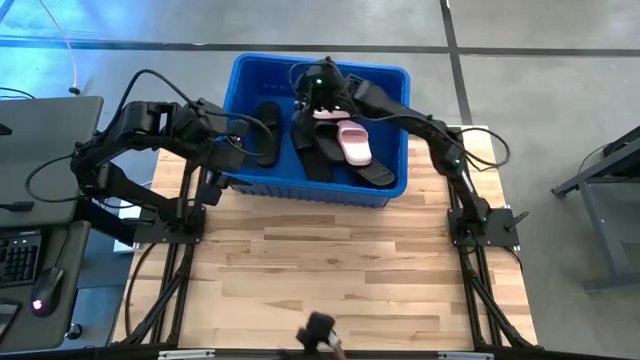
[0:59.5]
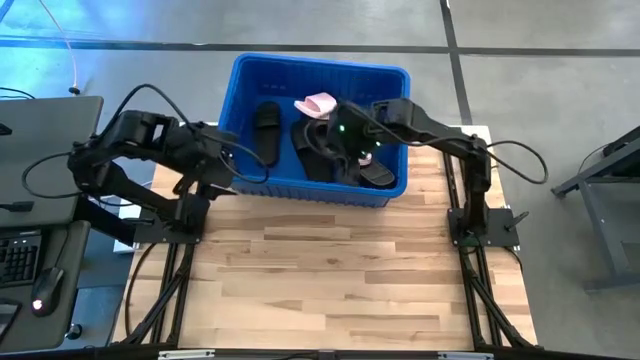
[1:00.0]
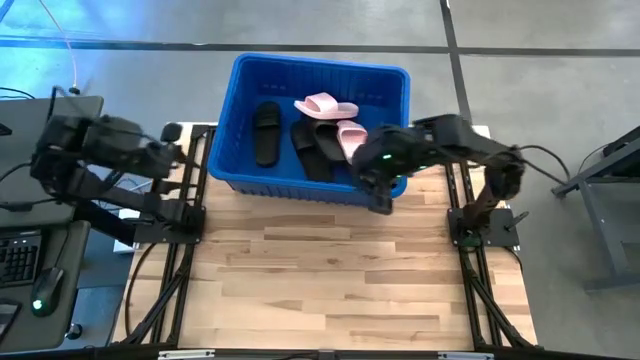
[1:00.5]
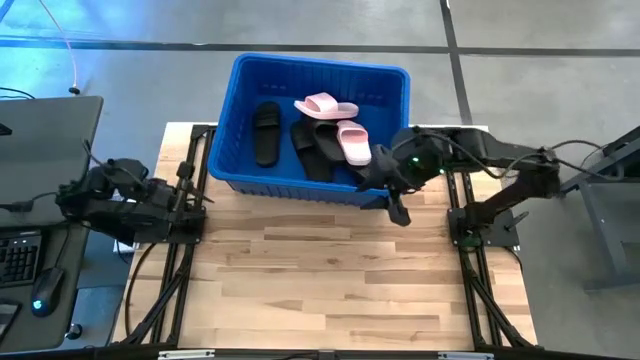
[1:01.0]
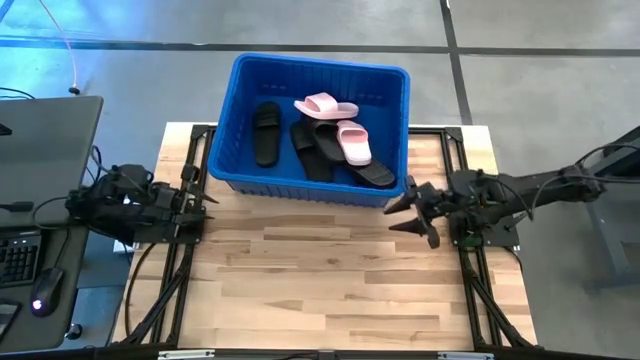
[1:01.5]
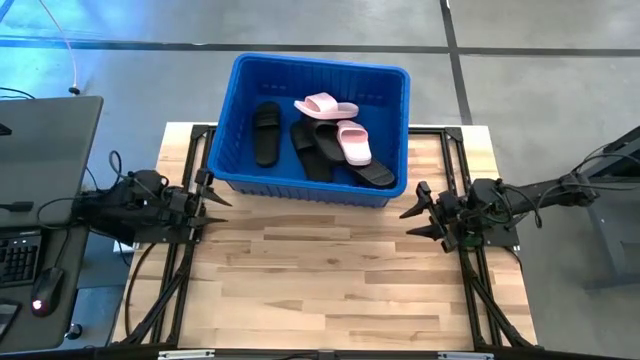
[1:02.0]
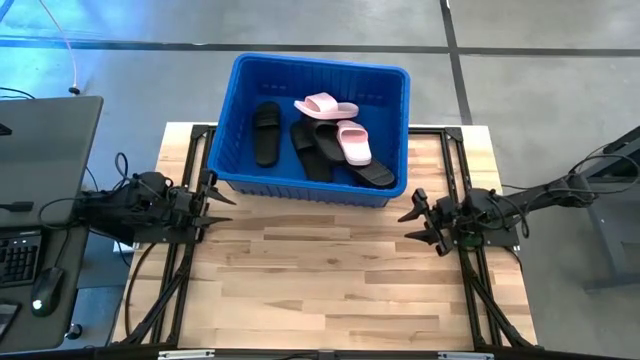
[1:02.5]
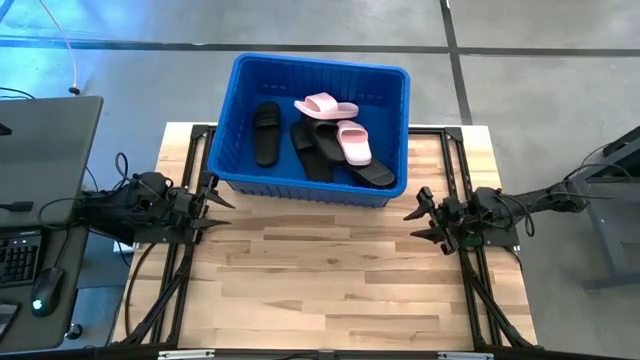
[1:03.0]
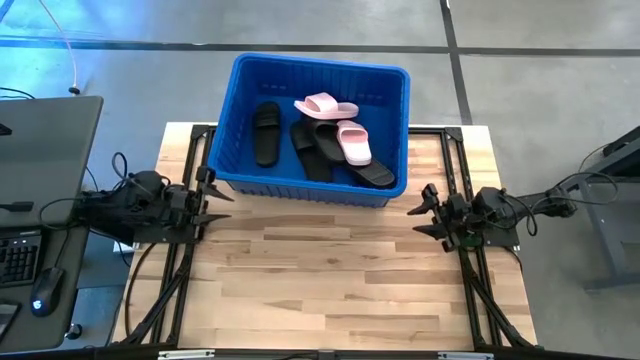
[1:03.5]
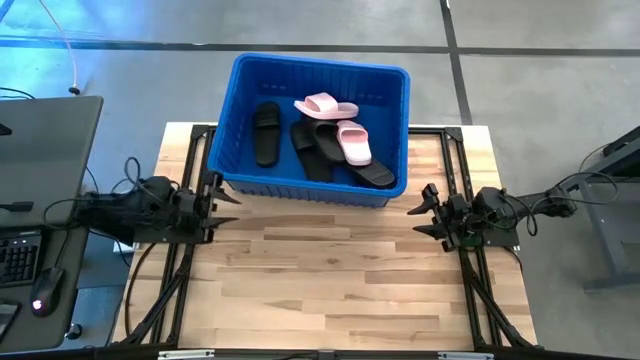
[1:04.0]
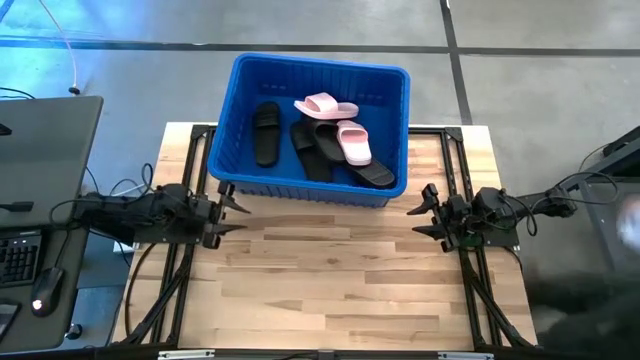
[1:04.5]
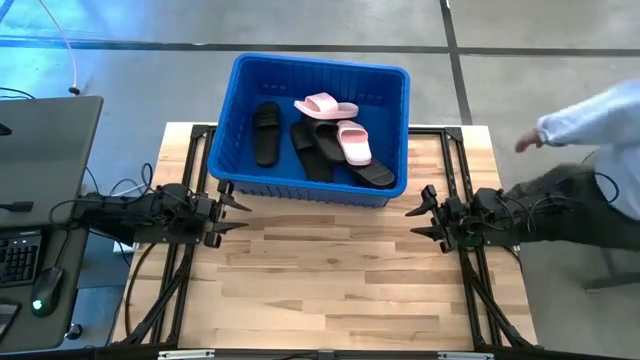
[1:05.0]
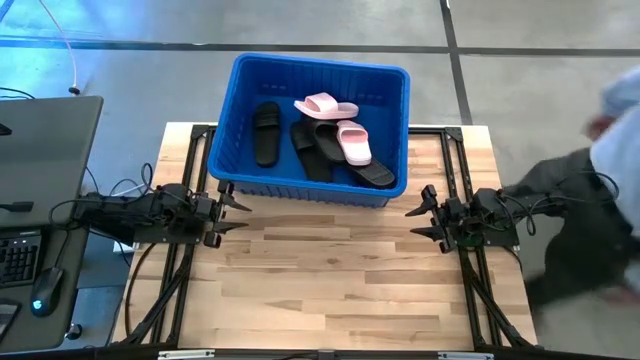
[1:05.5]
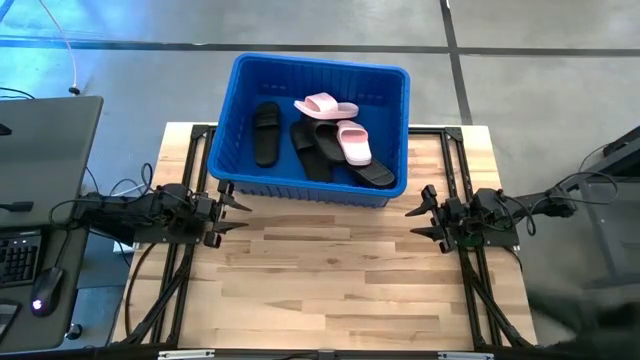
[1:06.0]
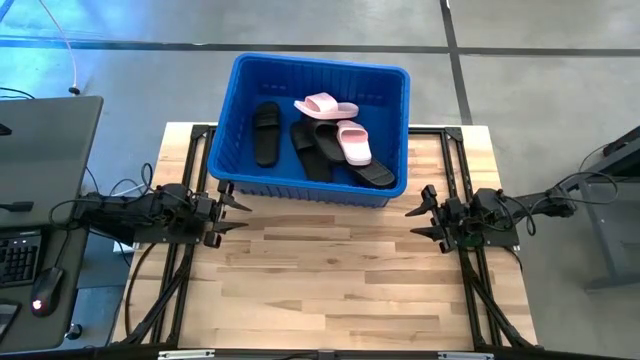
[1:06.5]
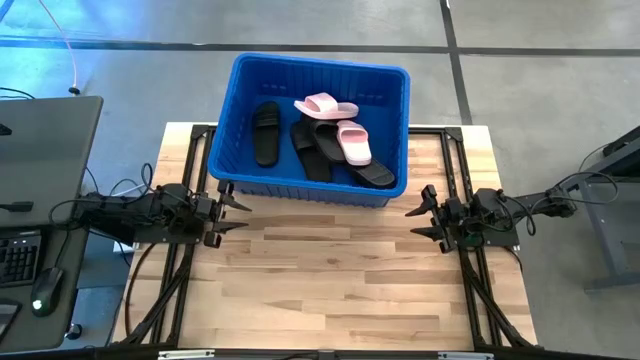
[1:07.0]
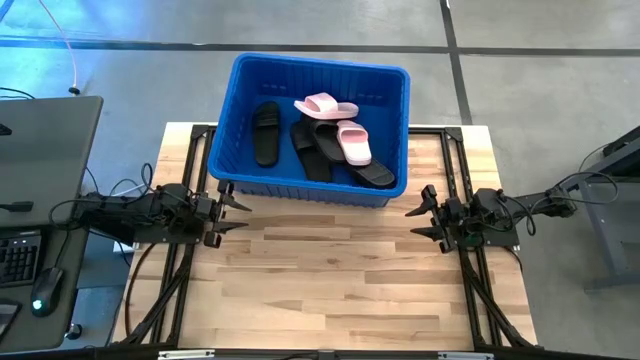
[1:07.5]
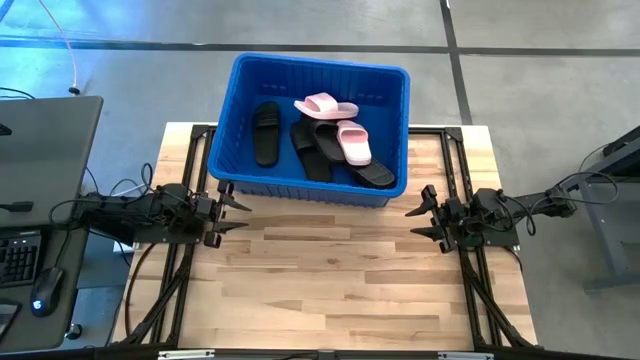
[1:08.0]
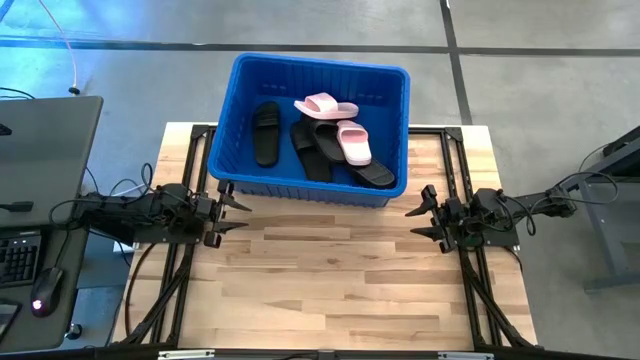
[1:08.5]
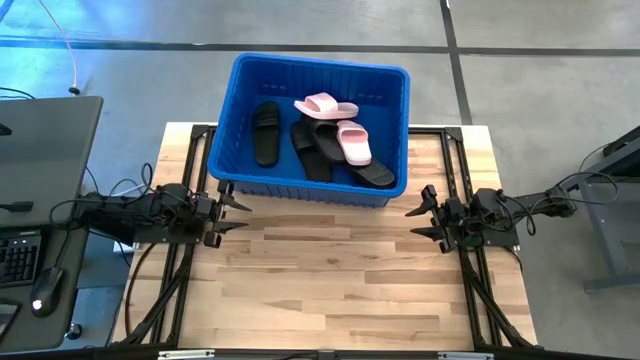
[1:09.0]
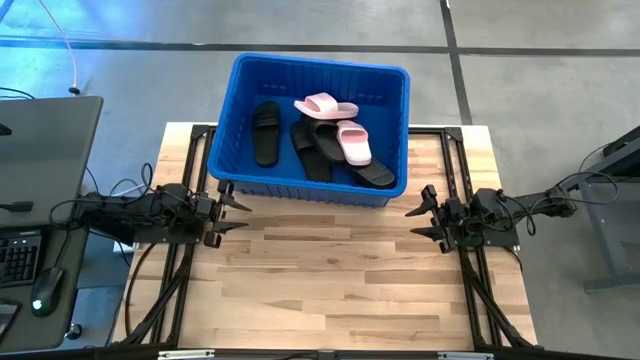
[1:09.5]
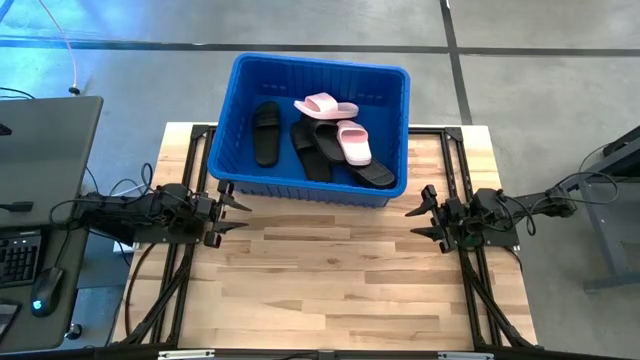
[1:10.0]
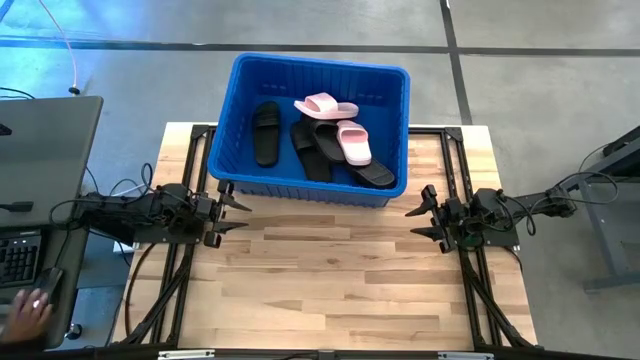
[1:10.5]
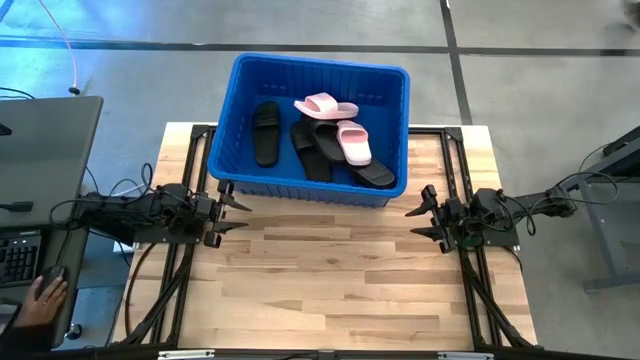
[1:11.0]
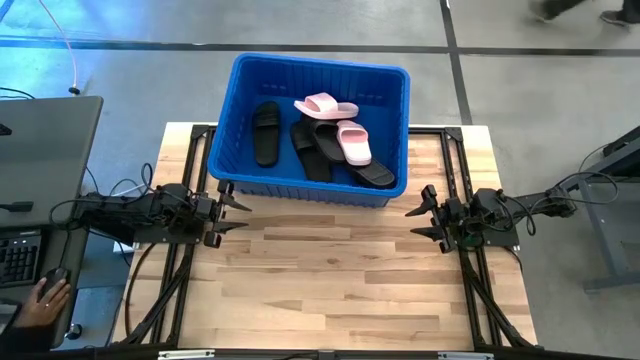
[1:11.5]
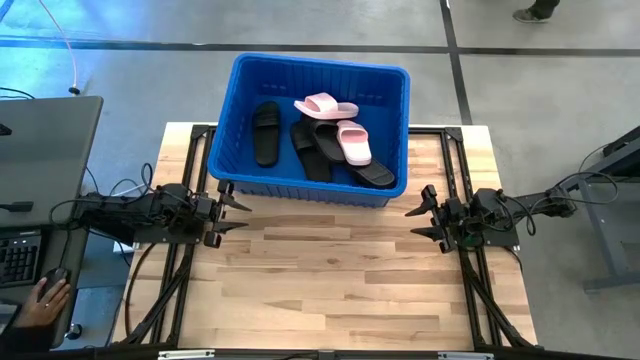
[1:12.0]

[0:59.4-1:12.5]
Task: Pick and place slides into bin
Return to Home Position

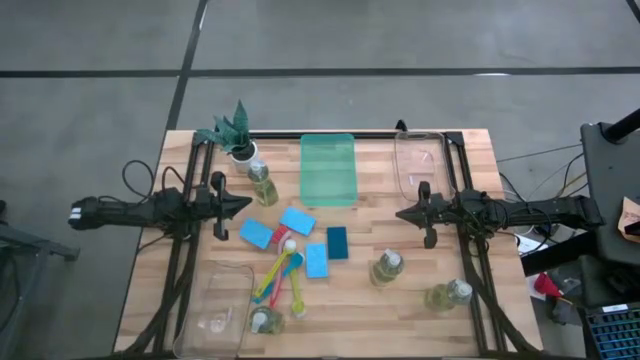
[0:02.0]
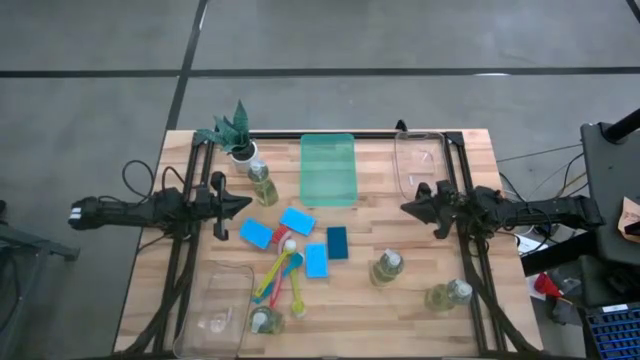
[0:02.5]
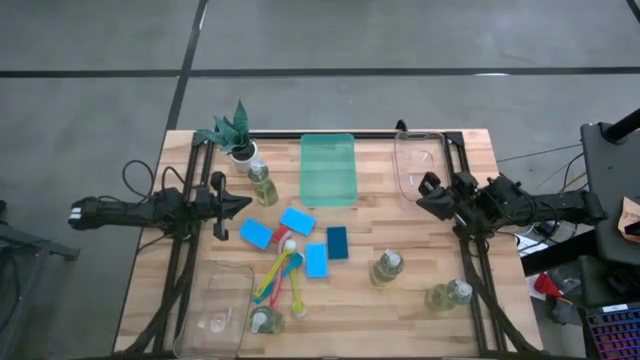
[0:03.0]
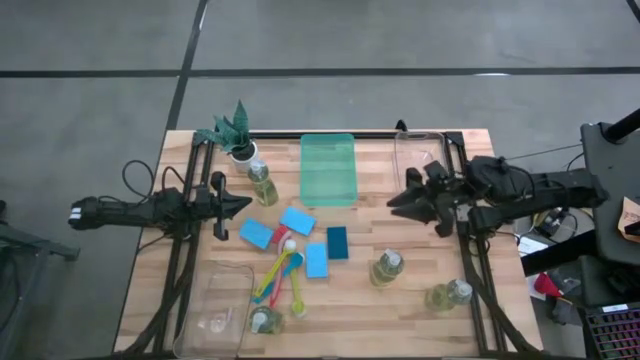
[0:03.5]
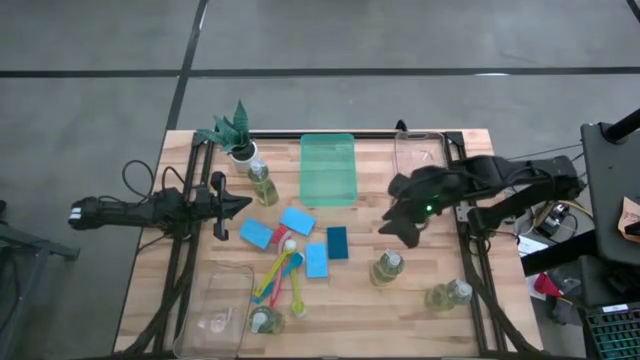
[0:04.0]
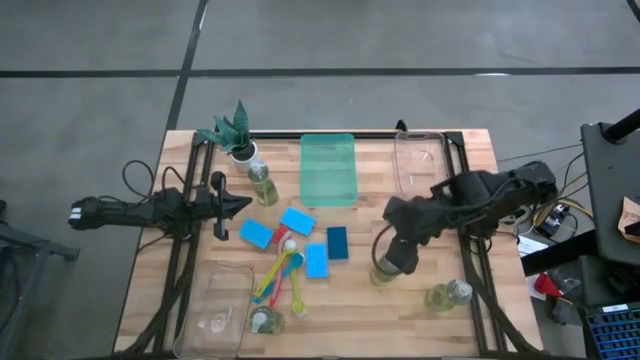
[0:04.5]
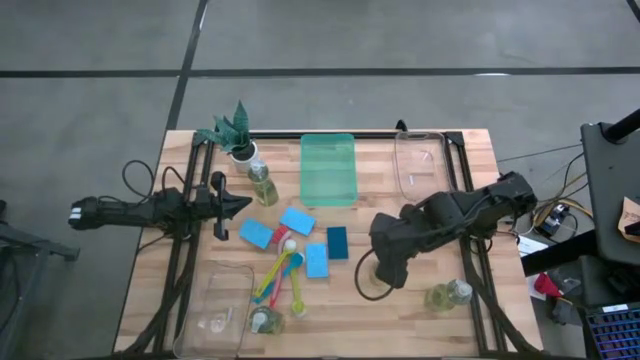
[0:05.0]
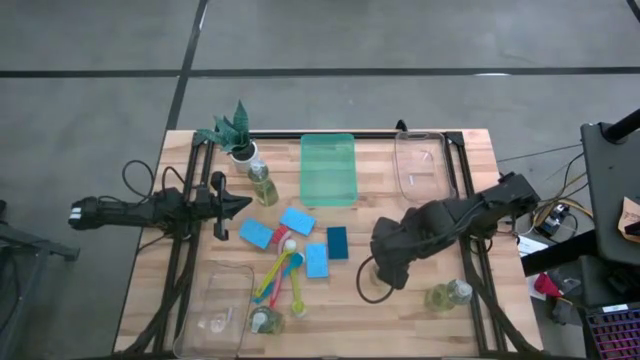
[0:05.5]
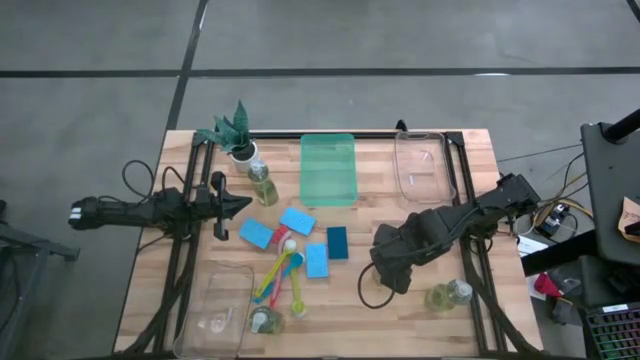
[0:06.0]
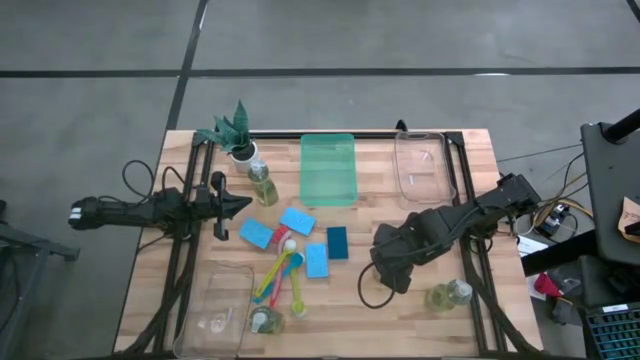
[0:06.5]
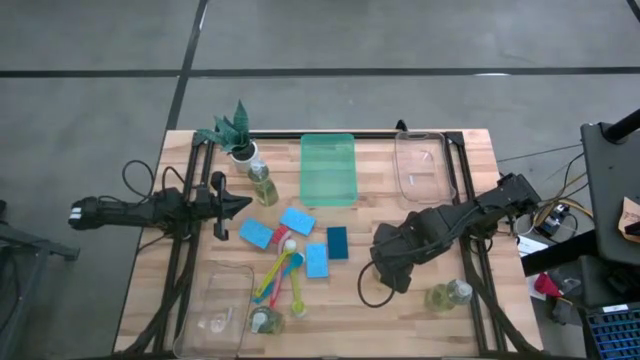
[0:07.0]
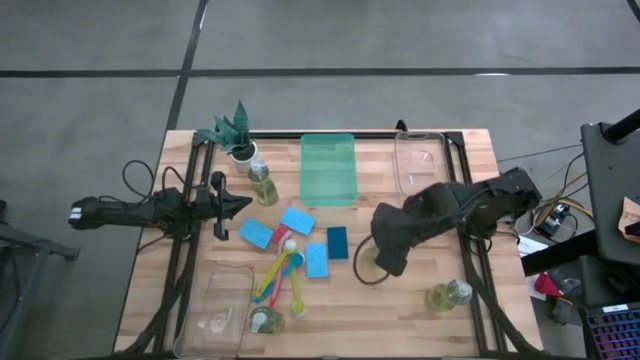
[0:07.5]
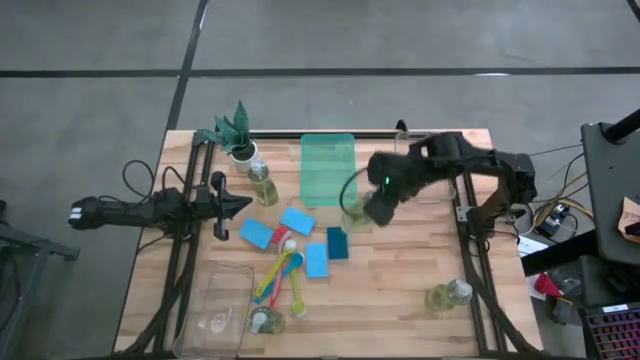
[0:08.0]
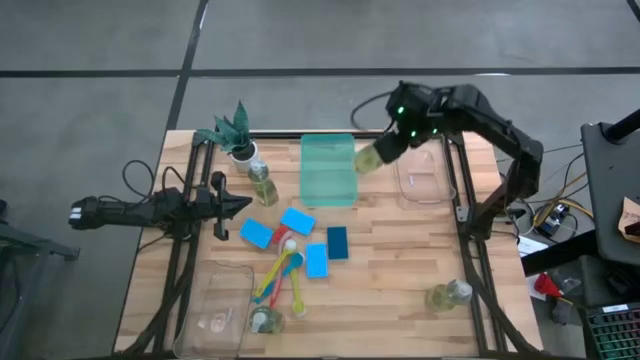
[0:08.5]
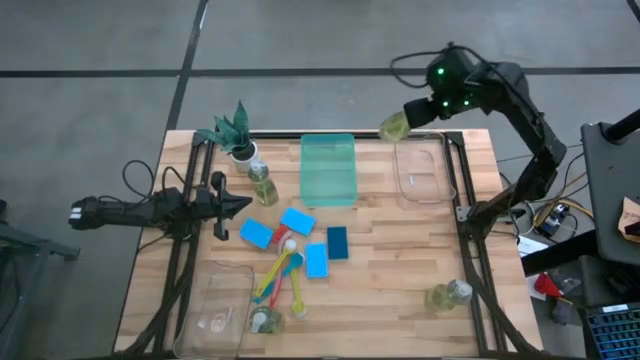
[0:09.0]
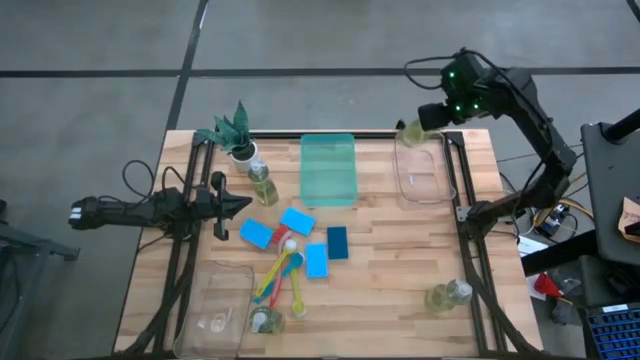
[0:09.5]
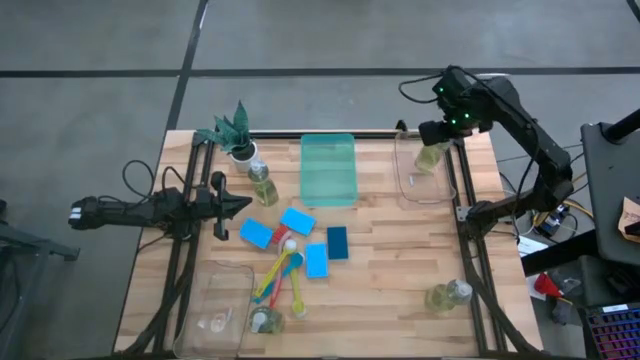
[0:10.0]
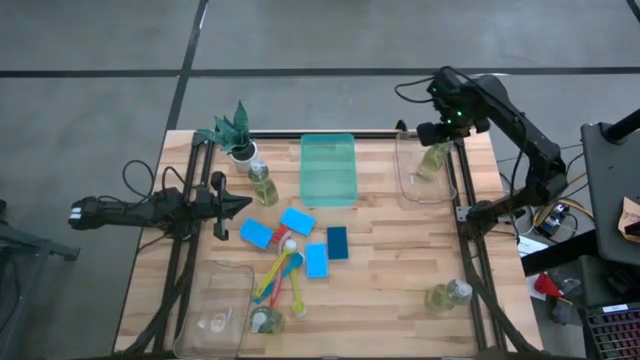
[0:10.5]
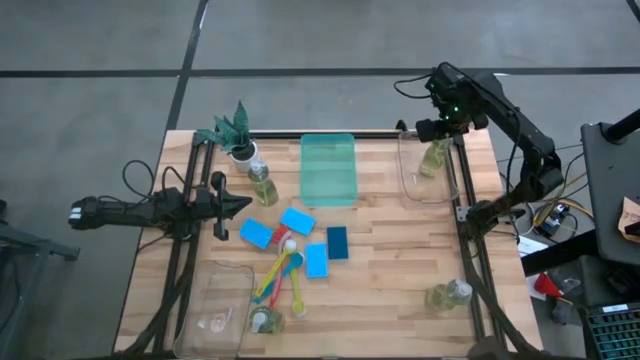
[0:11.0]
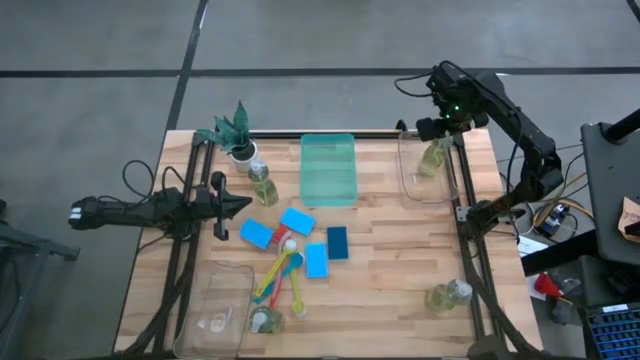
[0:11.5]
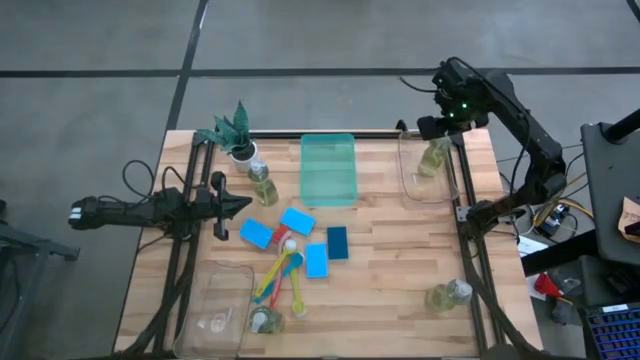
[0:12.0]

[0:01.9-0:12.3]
Task: Pick & Place Kitchen Sink Supplies
Put the yellow soap dispenser into the top transparent bin
